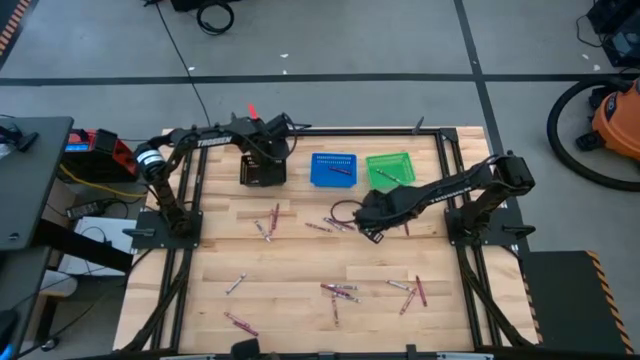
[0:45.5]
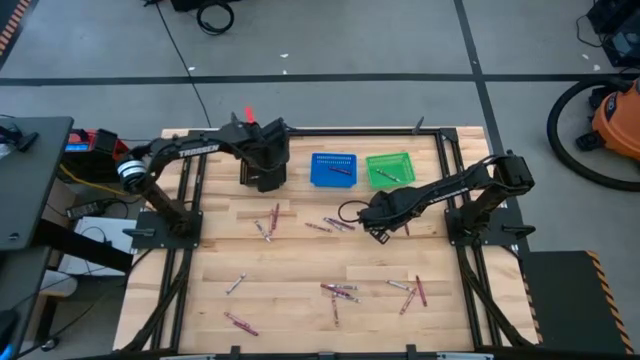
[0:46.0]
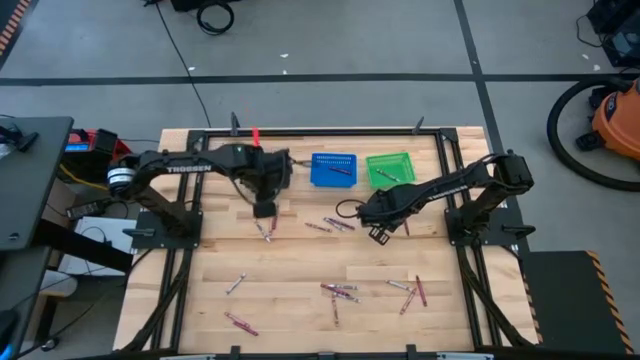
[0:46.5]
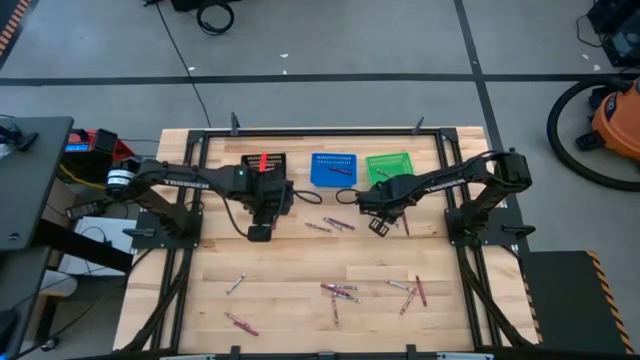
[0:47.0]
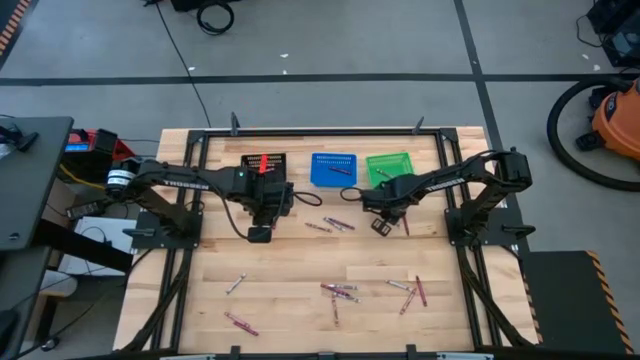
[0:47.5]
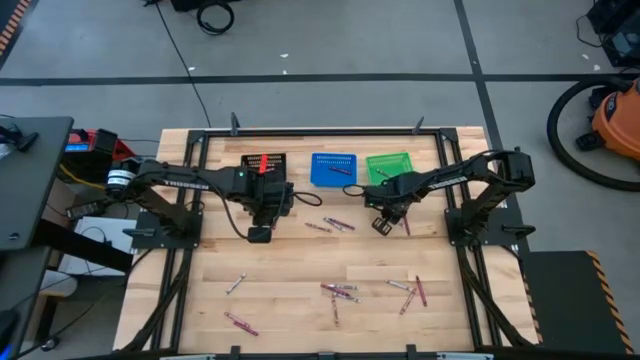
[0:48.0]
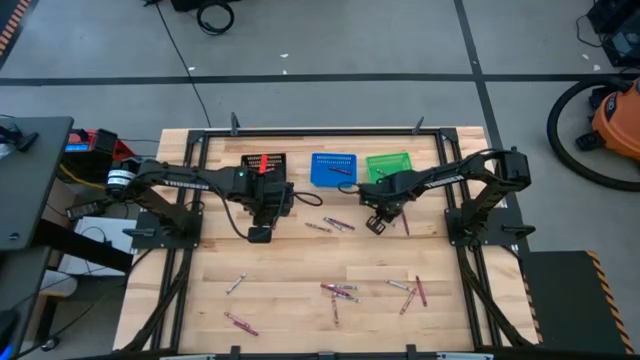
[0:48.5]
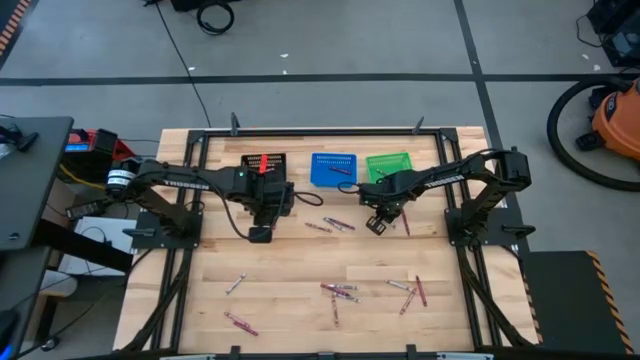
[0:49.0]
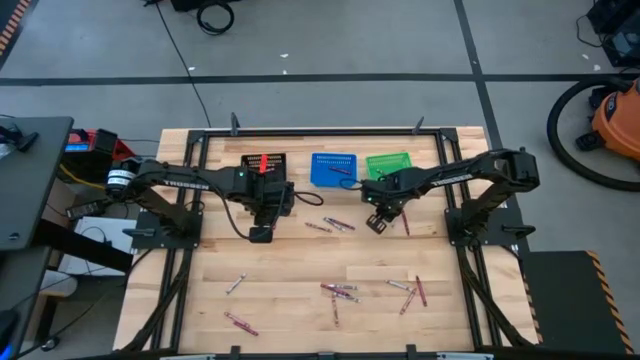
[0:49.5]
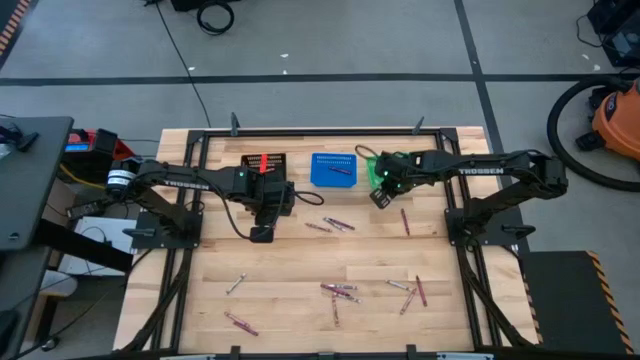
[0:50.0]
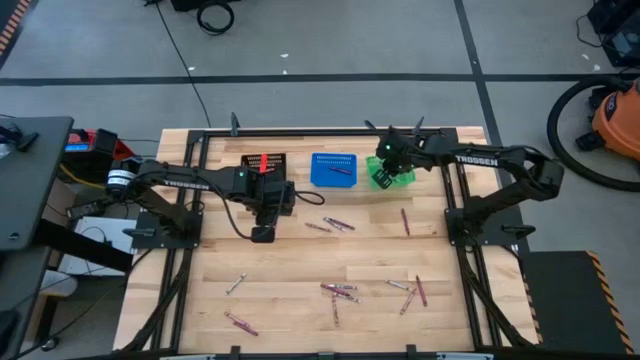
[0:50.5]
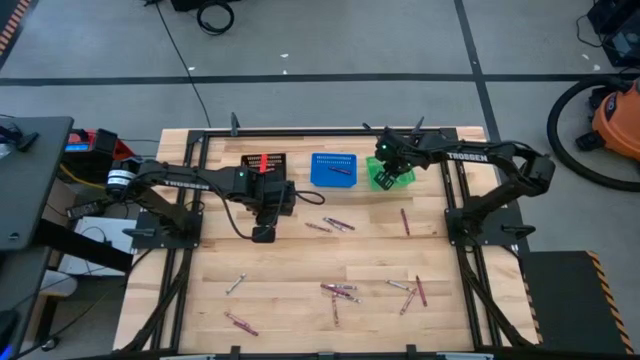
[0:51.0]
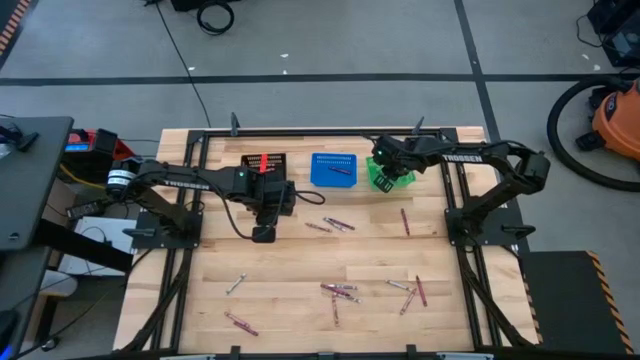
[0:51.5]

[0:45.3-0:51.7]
Task: Sort crayons
Put the white crayon into the green bin

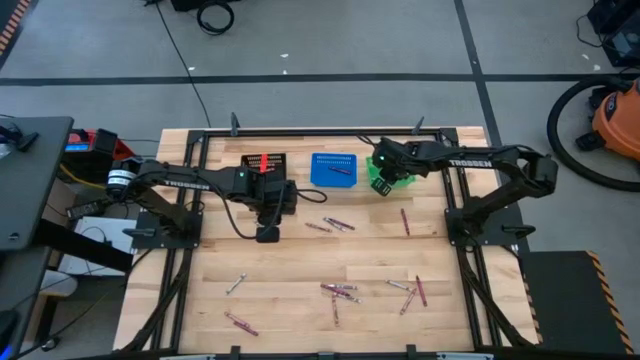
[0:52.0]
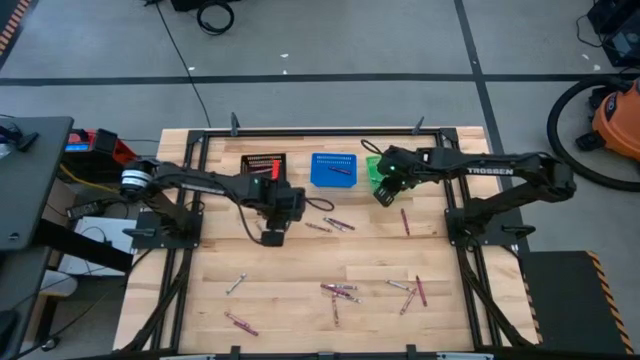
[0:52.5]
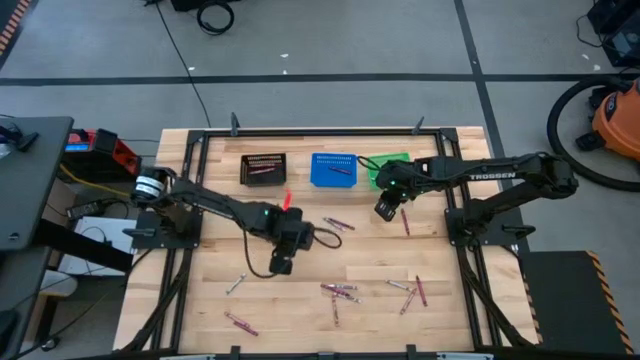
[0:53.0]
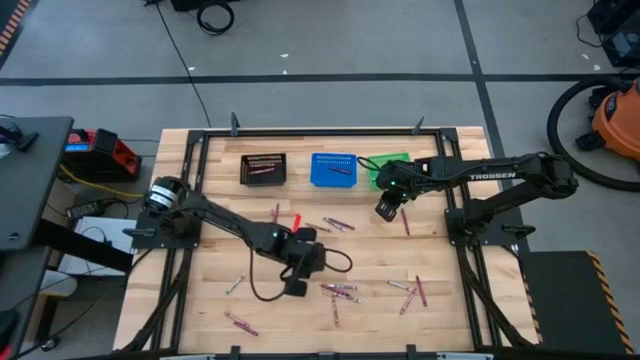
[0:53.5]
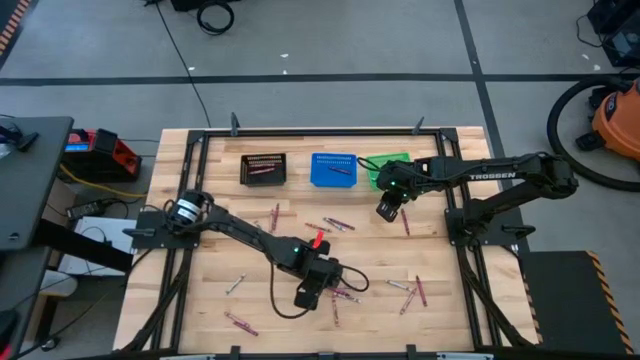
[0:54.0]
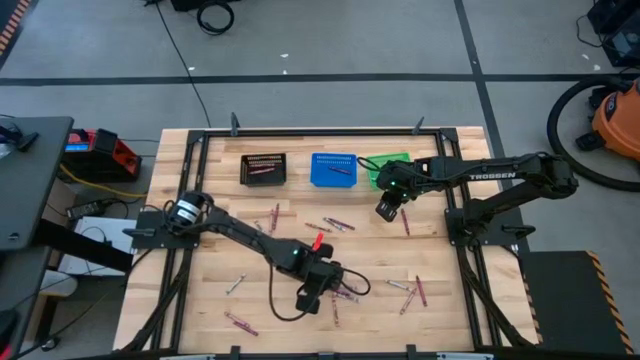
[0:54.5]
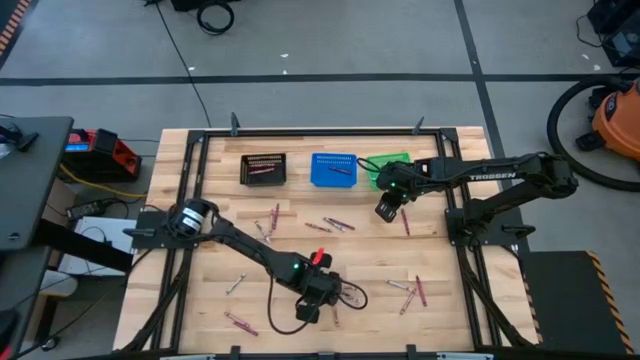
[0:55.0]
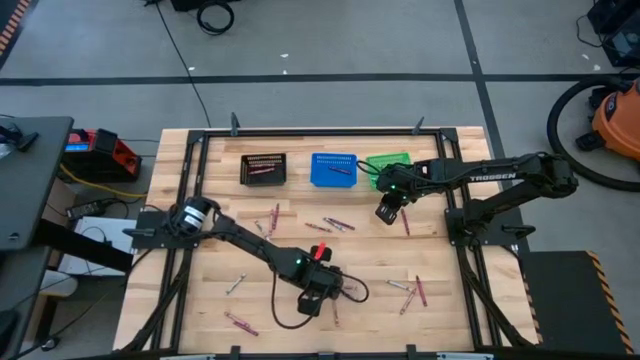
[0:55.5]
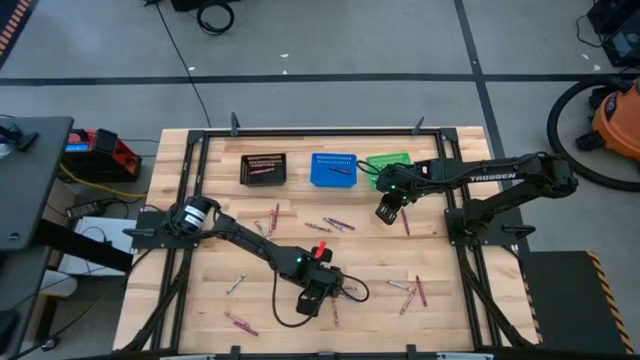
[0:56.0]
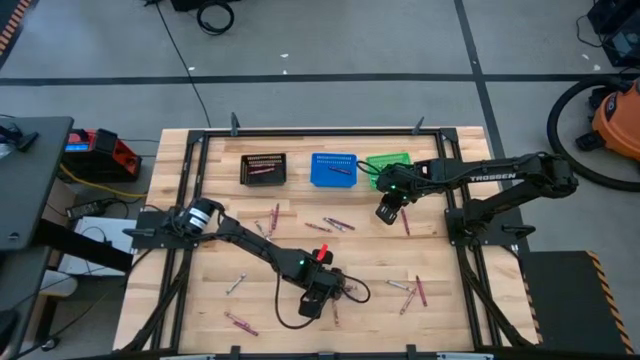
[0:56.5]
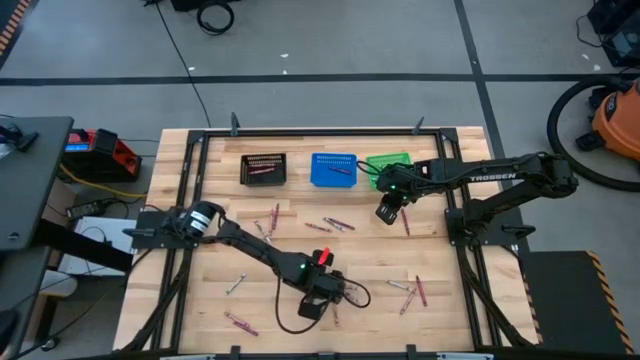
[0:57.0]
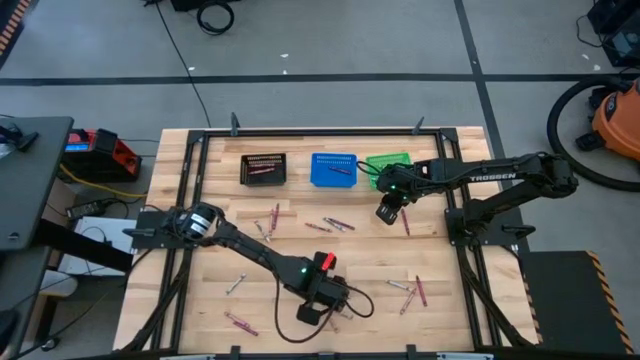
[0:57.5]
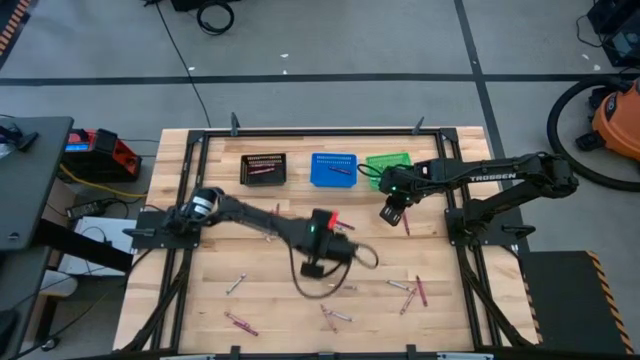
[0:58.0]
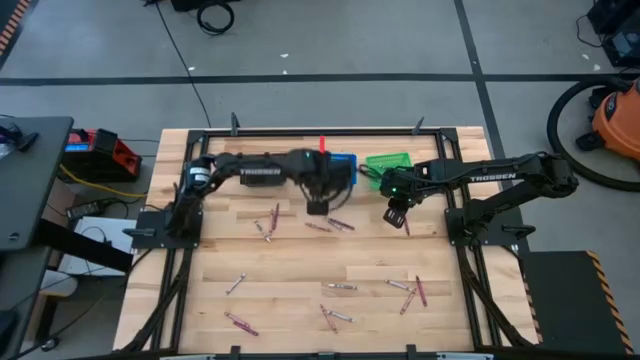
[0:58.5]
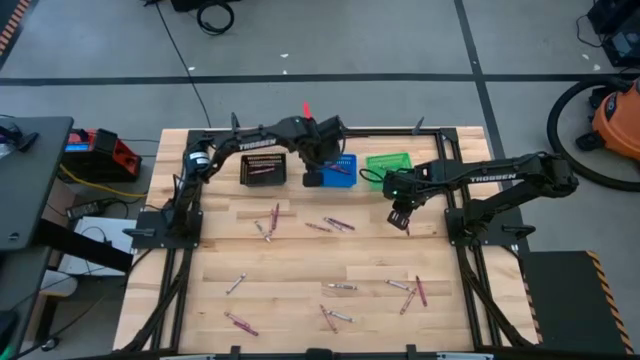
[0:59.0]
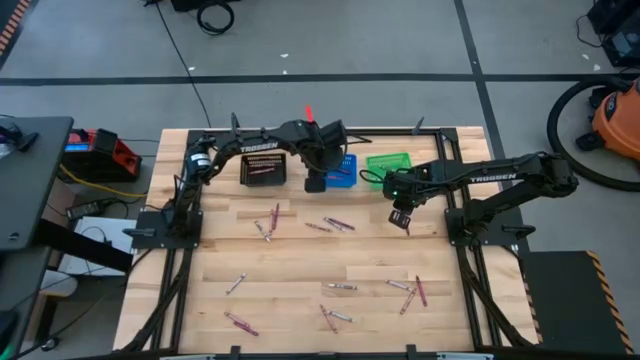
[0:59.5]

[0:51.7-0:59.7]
Put the red crayon into the blue bin

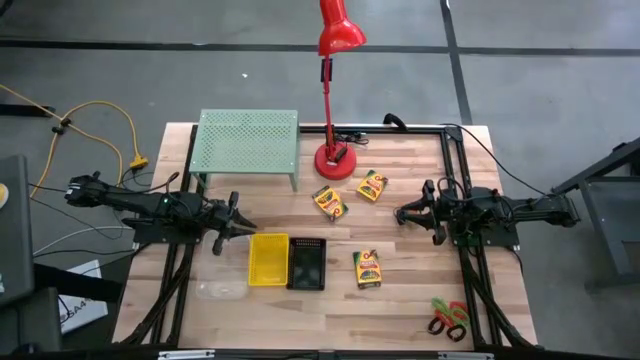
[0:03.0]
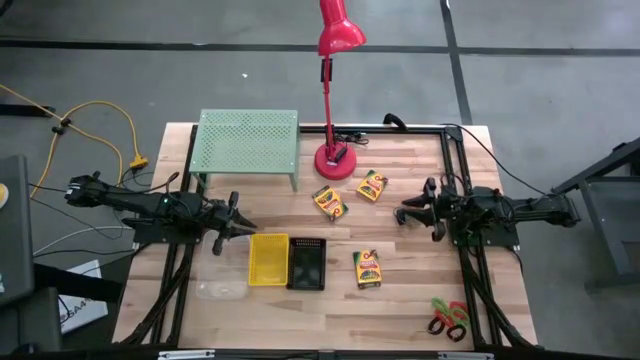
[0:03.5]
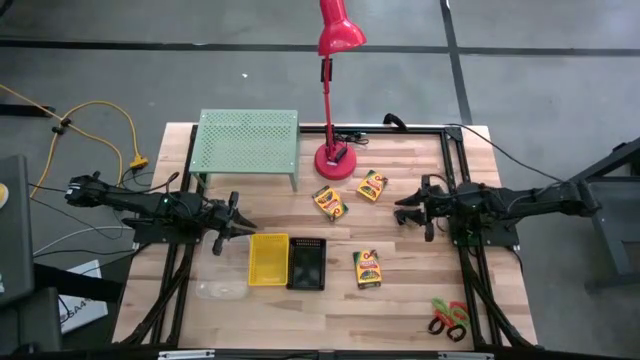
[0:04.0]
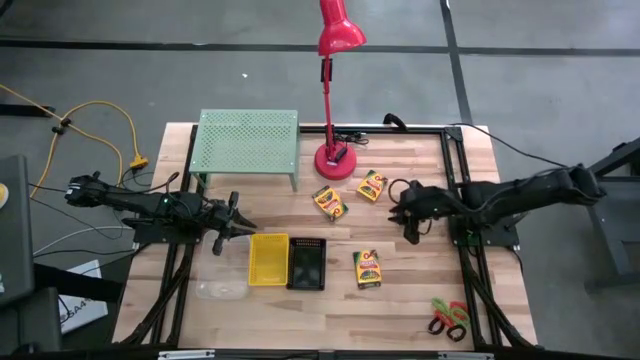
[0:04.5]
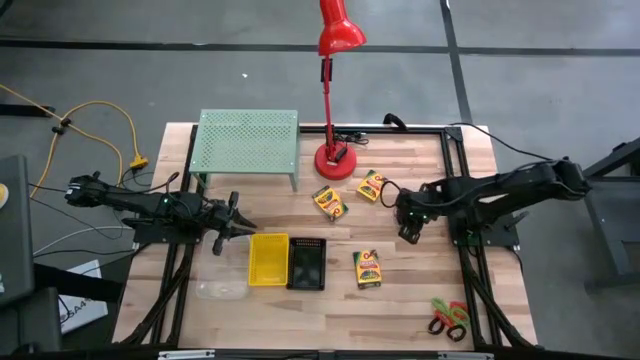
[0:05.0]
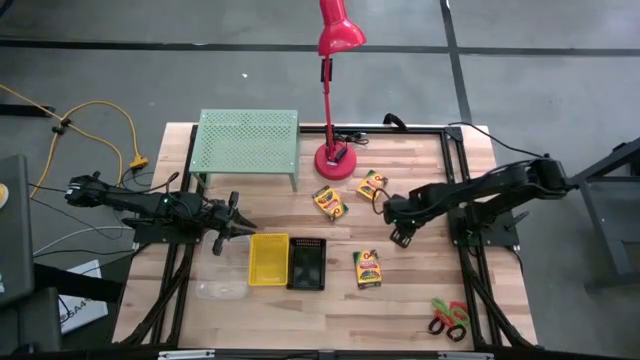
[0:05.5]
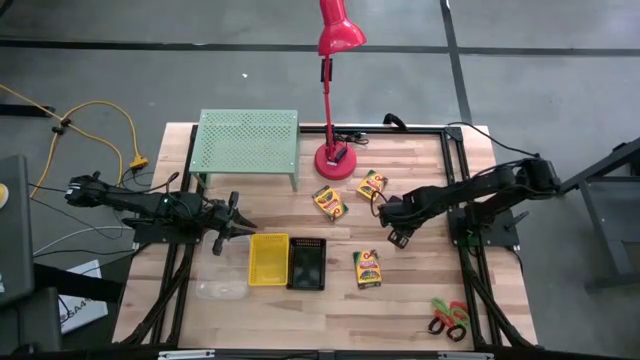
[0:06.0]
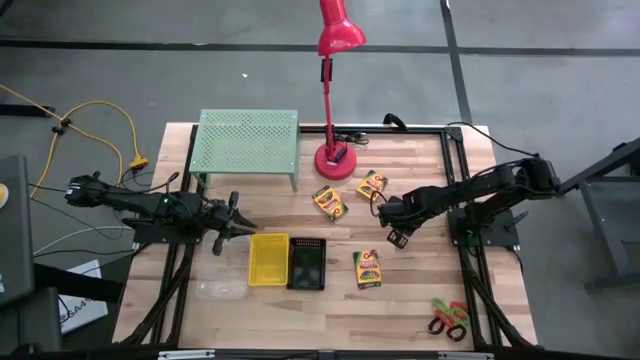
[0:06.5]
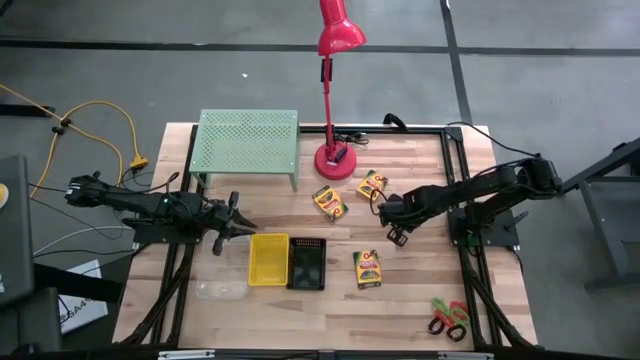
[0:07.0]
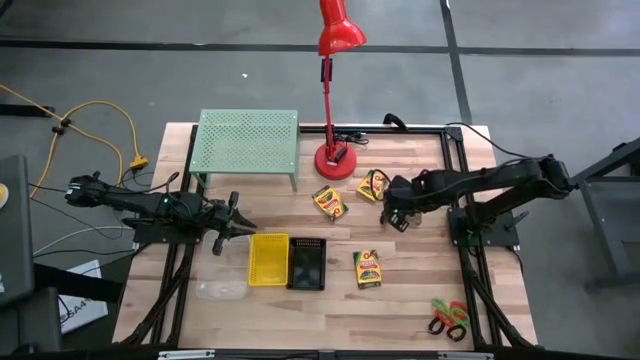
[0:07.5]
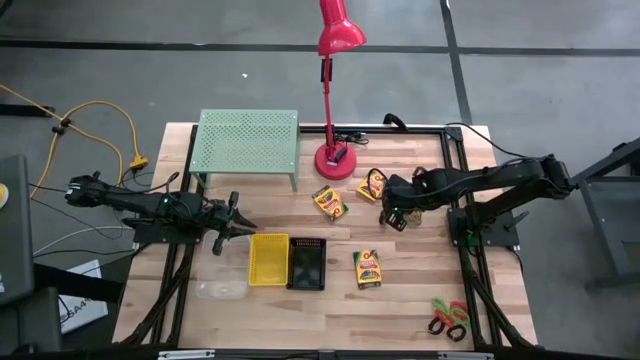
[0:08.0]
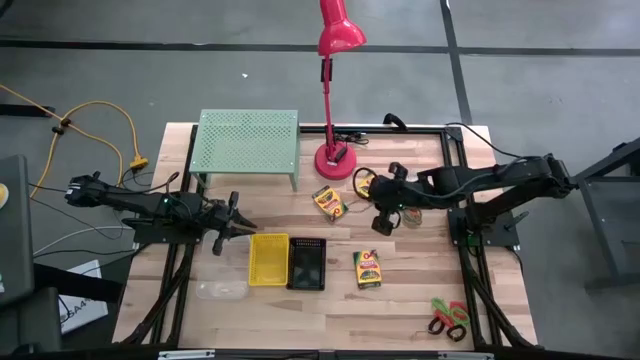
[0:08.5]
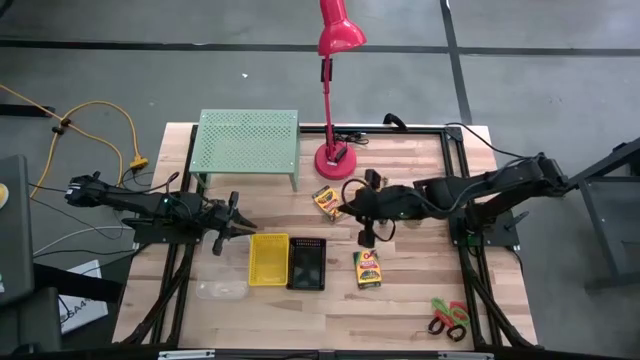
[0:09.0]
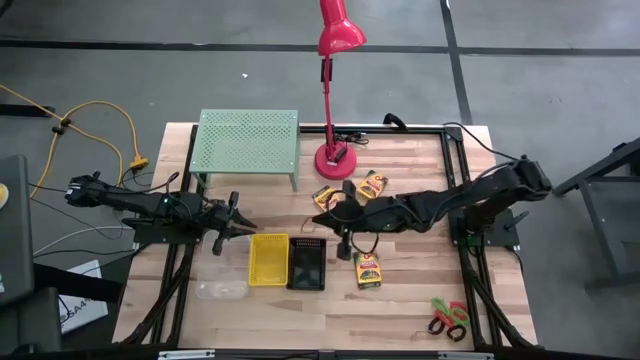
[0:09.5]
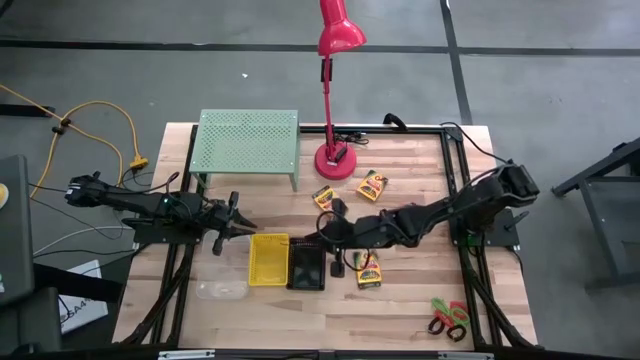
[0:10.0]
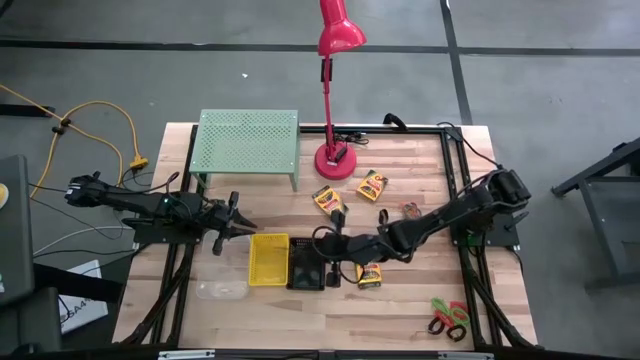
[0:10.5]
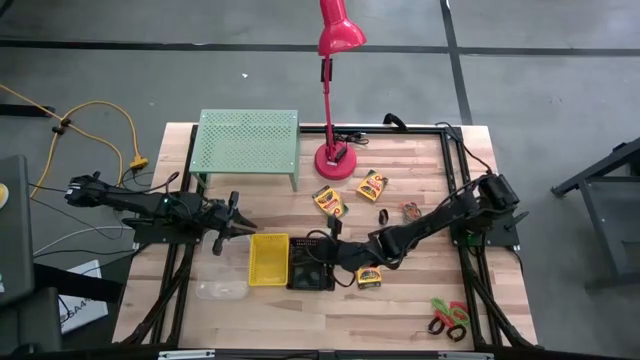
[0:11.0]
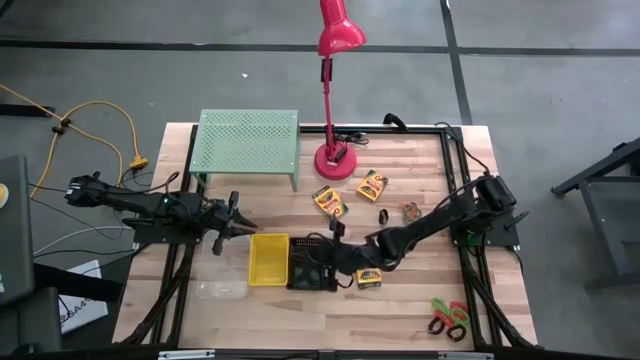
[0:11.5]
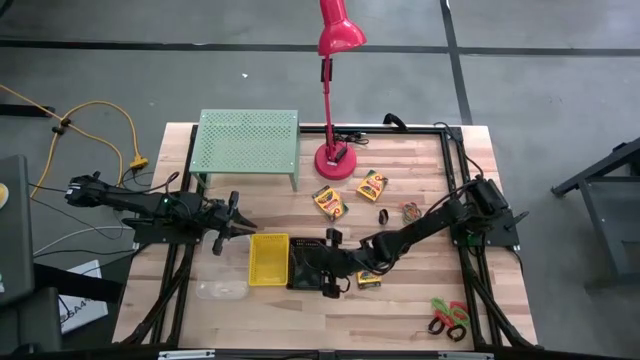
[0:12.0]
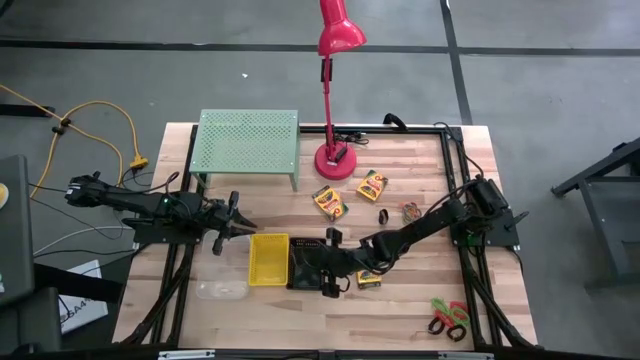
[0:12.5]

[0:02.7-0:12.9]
Task: Pick & Place Office Desk Supplies
Put the purple rubber band into the black bin
